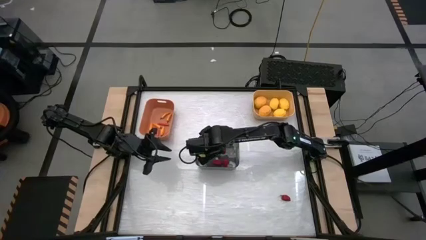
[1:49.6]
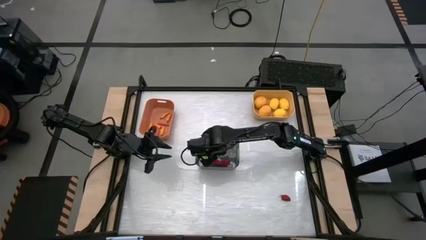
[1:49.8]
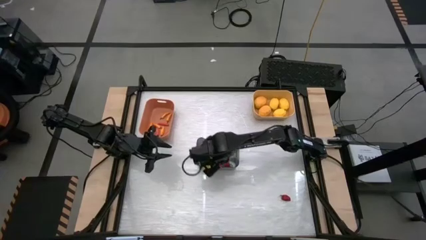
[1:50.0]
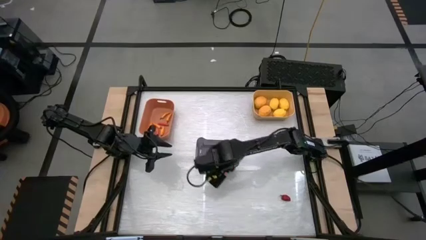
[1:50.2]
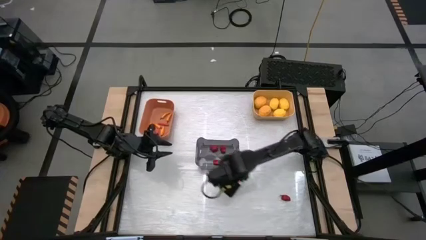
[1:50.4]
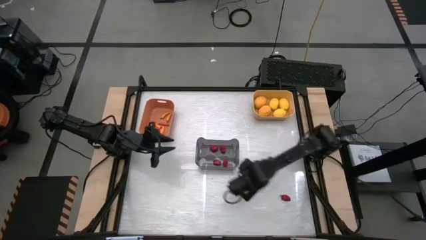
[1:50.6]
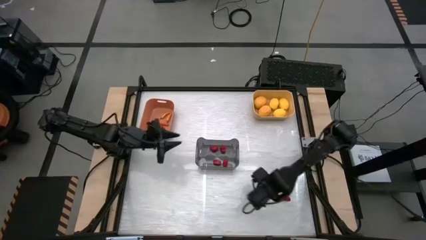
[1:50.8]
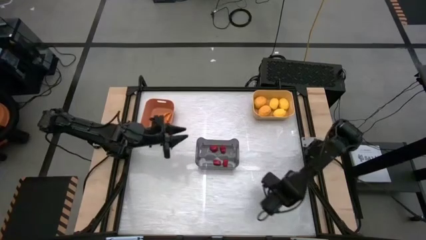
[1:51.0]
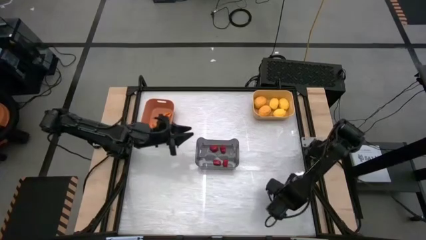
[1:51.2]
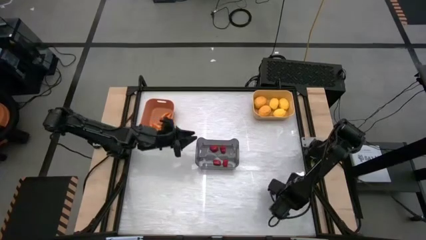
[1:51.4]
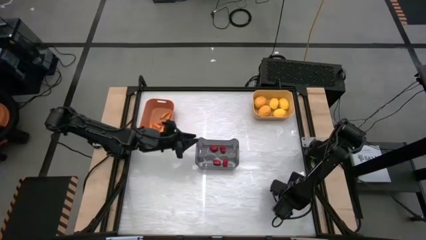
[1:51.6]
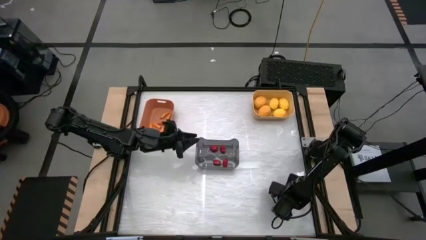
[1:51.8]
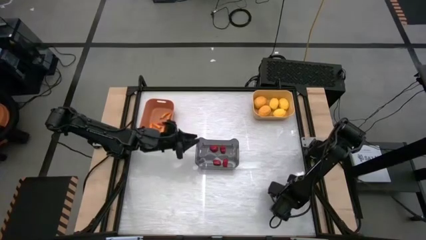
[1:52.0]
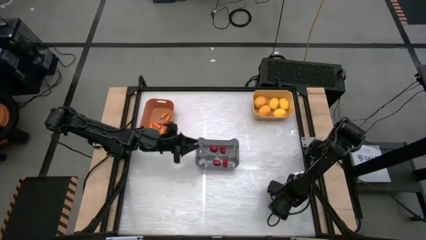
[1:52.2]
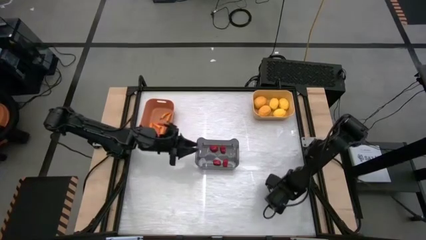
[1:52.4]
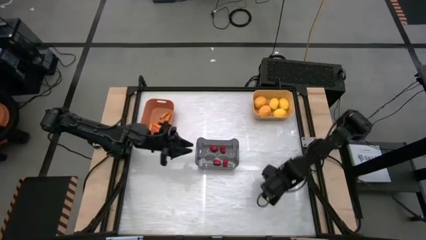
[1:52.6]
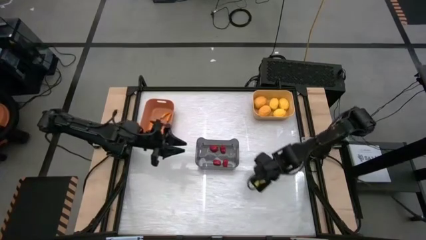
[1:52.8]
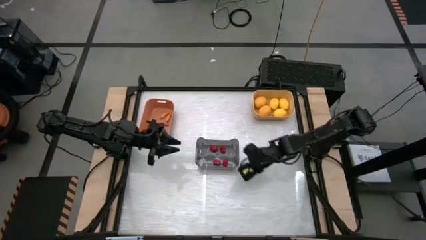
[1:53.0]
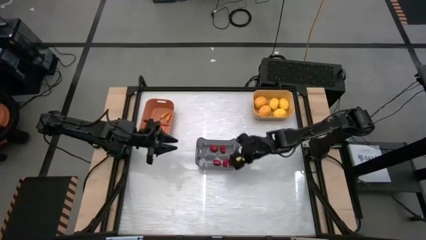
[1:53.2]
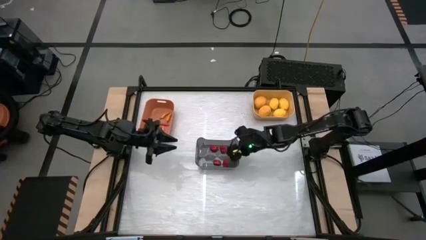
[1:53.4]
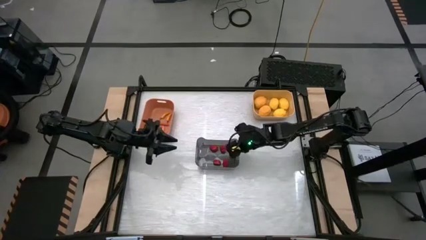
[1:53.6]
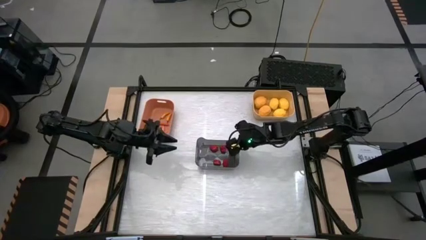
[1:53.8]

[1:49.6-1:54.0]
Task: Sort produce into baskets
Put the red bell pepper into the gray bin

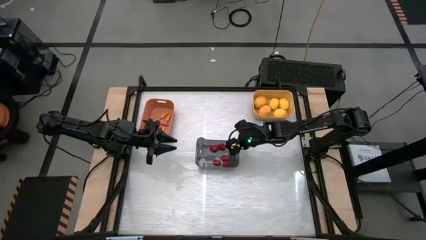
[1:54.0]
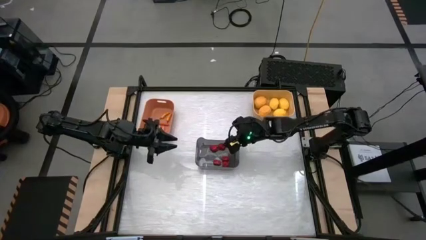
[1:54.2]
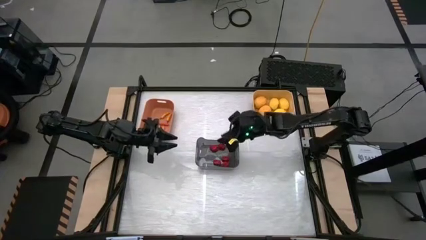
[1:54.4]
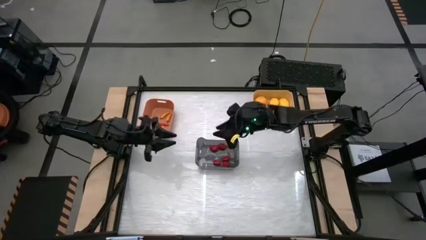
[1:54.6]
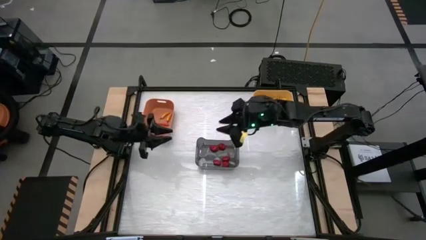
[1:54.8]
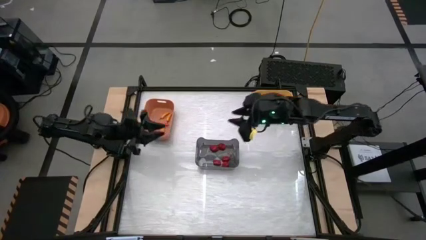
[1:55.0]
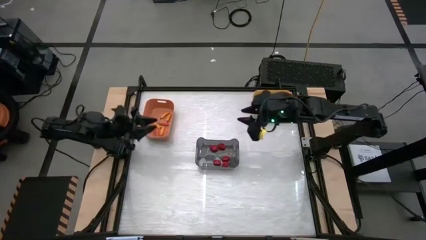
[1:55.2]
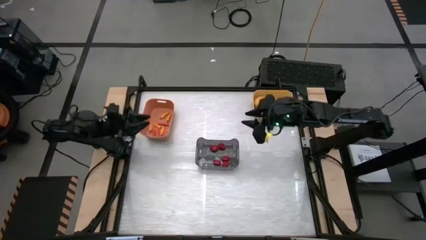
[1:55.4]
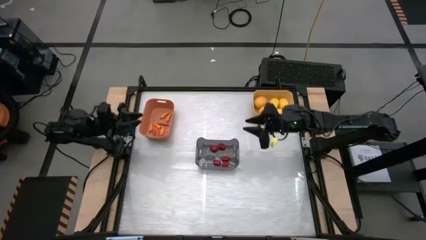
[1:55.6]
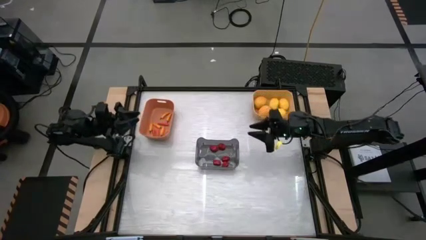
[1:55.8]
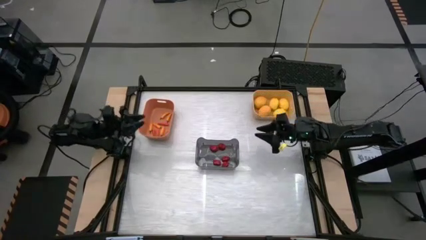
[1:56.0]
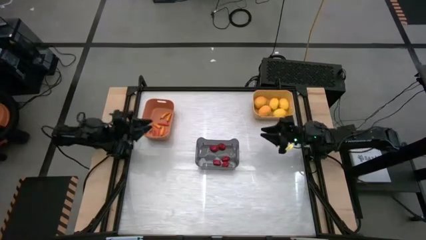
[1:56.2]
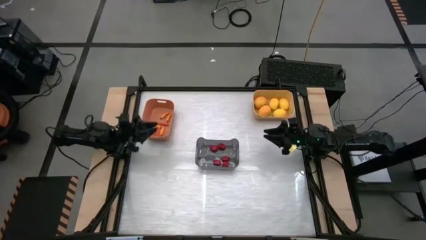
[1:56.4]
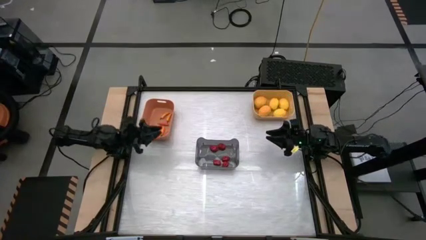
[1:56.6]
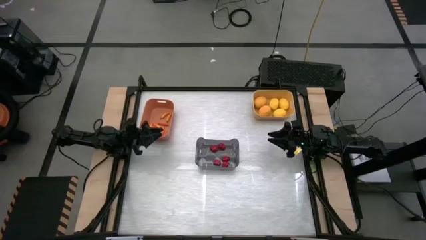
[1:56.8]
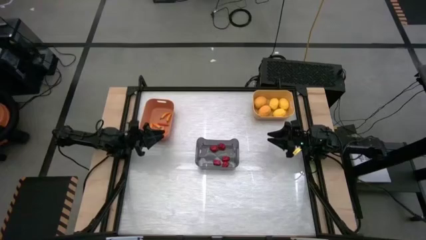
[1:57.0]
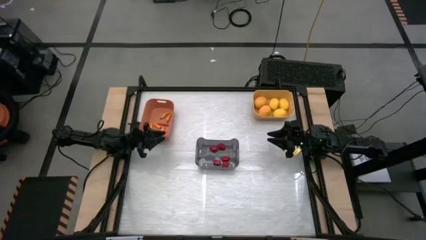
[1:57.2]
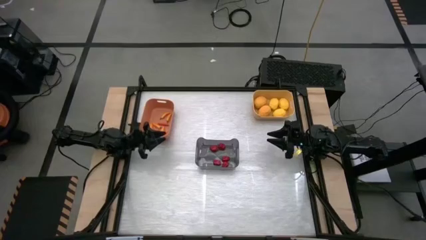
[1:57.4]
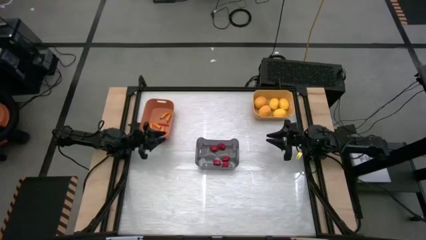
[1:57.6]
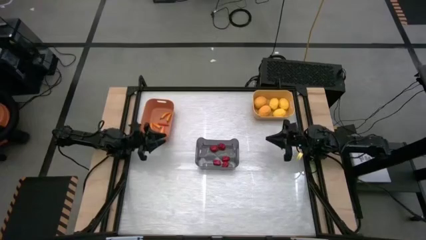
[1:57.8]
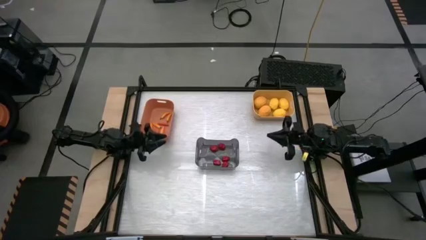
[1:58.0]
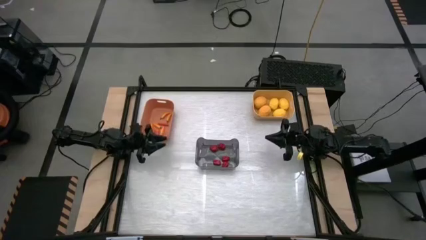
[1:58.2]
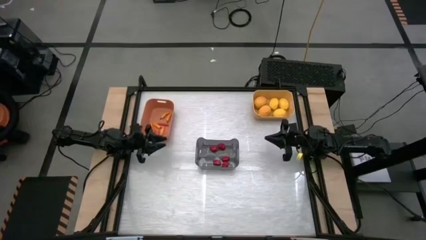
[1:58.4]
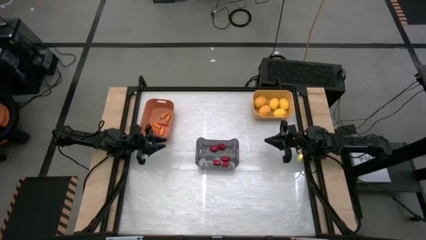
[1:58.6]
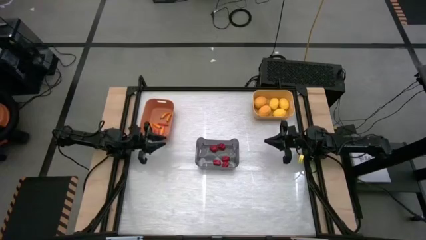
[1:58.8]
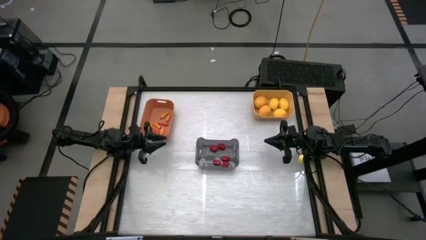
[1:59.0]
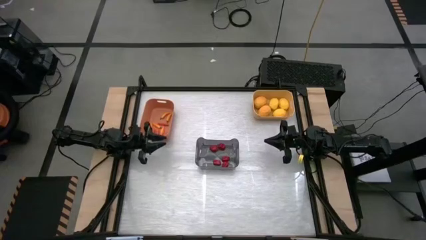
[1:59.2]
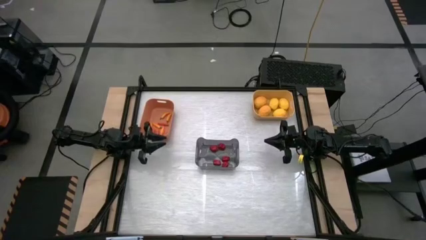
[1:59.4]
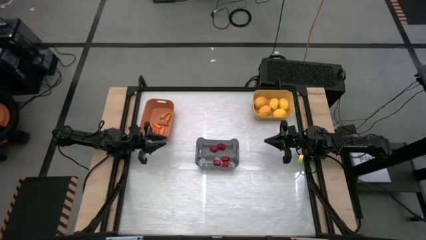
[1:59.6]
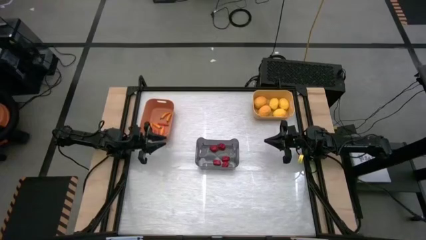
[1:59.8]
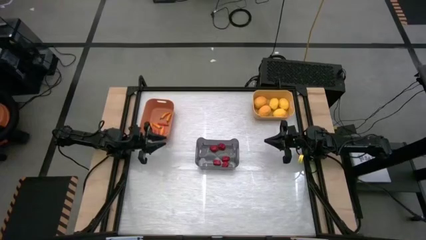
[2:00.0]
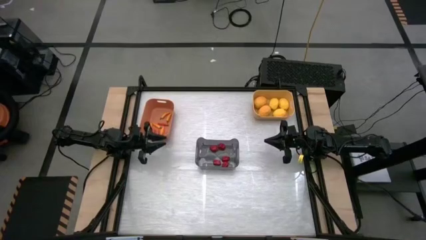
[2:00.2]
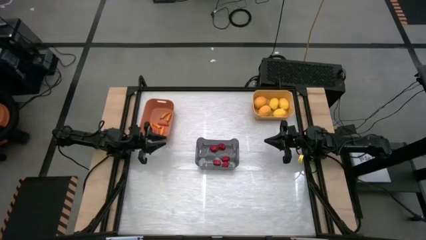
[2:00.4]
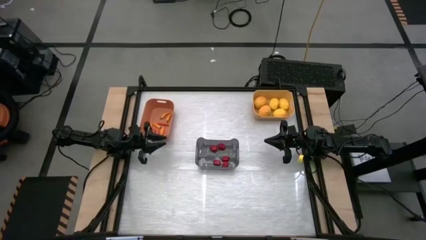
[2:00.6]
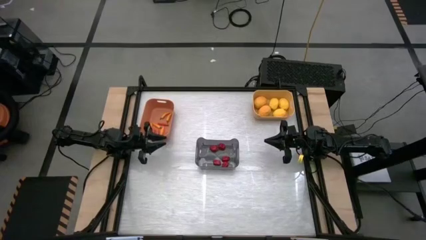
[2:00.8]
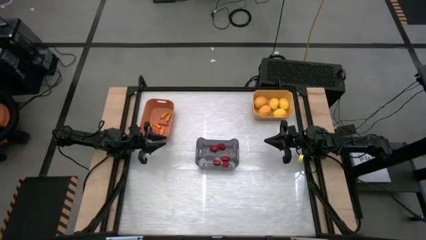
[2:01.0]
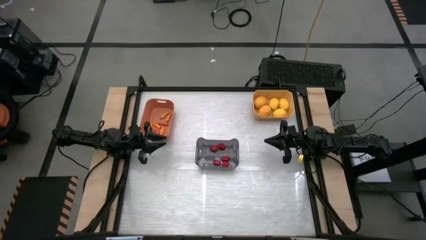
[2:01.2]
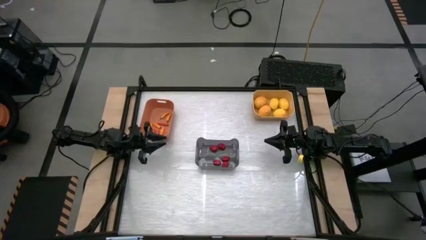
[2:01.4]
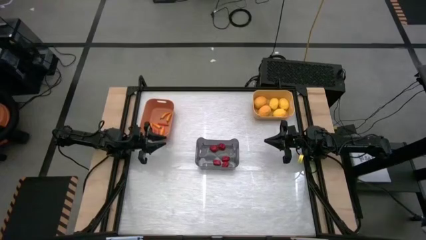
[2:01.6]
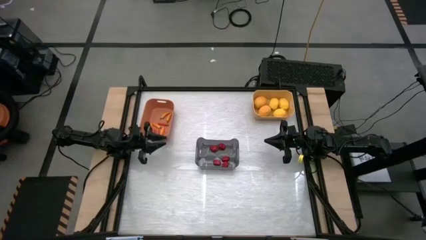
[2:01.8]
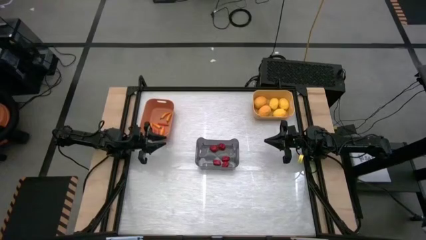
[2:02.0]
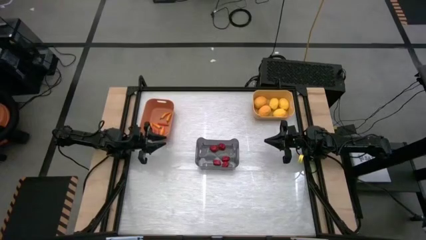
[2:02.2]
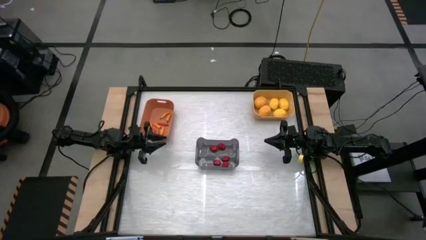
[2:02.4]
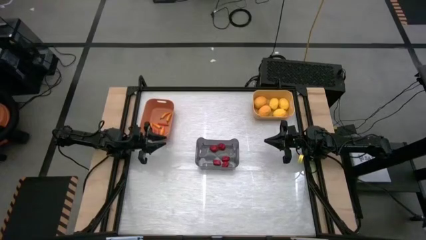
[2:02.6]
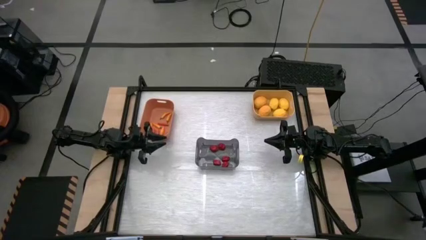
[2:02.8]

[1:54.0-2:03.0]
Return to Home Position

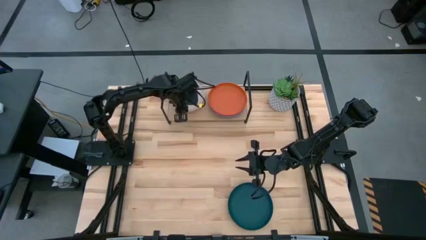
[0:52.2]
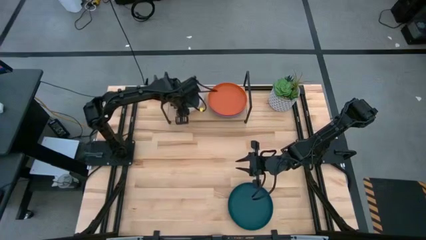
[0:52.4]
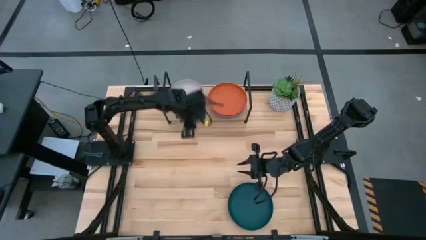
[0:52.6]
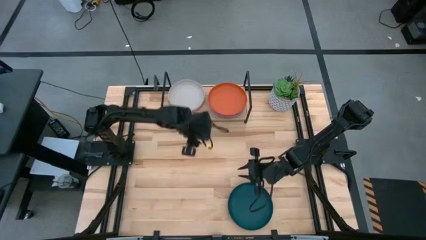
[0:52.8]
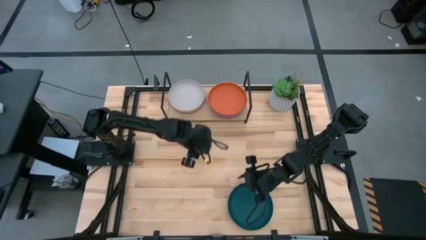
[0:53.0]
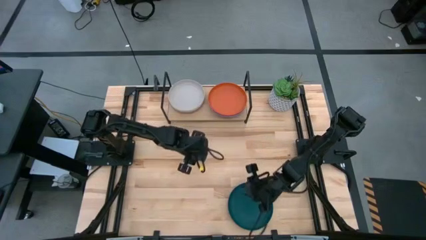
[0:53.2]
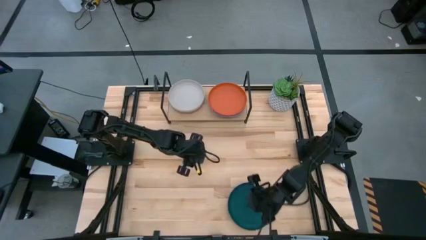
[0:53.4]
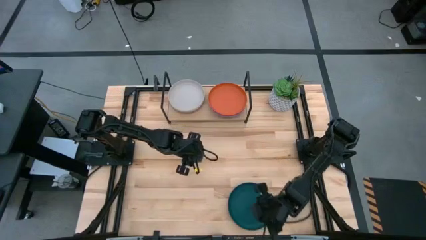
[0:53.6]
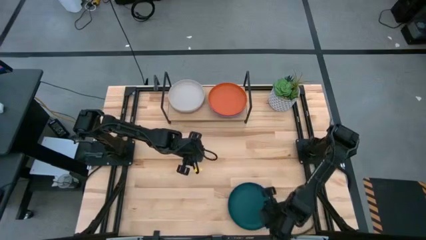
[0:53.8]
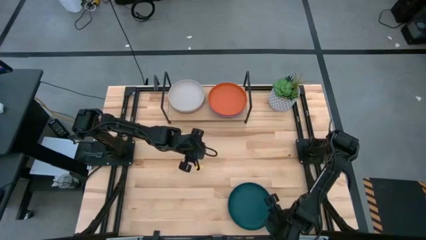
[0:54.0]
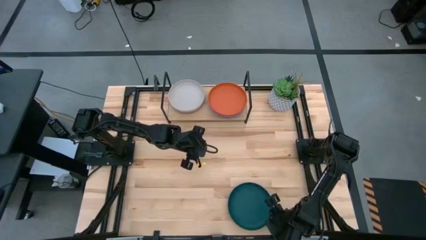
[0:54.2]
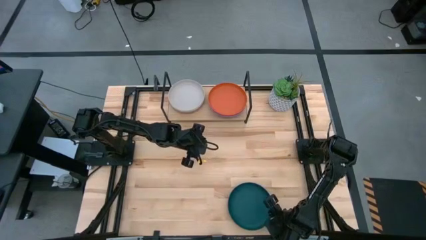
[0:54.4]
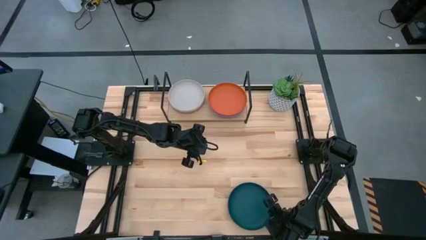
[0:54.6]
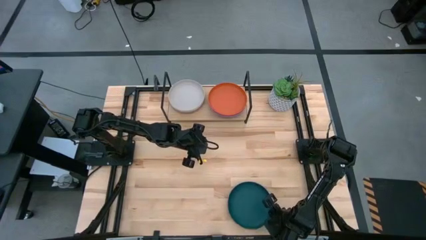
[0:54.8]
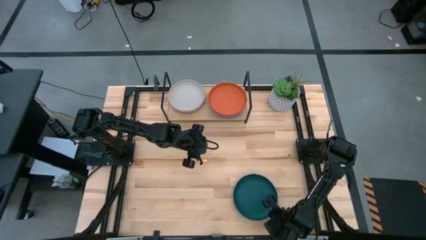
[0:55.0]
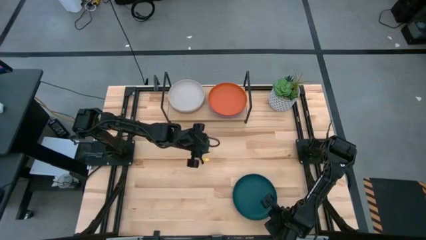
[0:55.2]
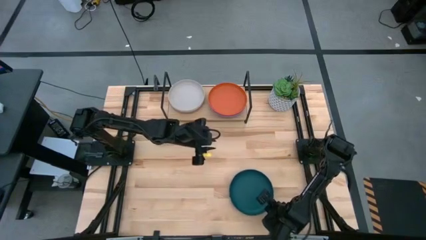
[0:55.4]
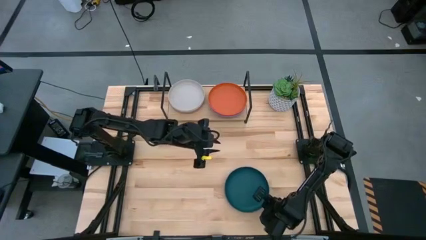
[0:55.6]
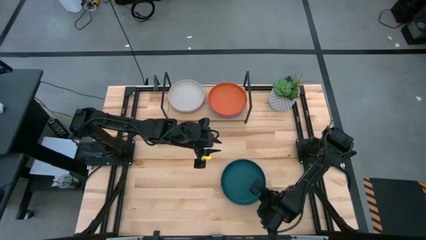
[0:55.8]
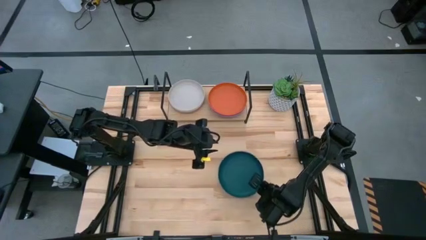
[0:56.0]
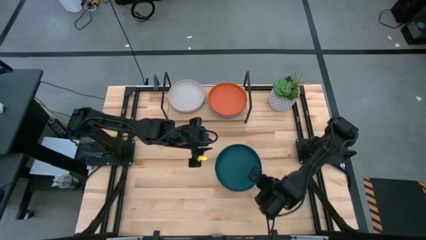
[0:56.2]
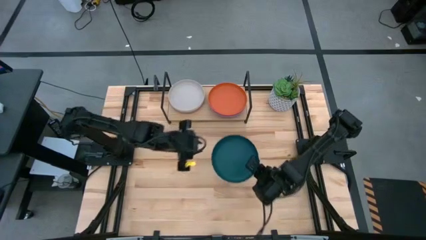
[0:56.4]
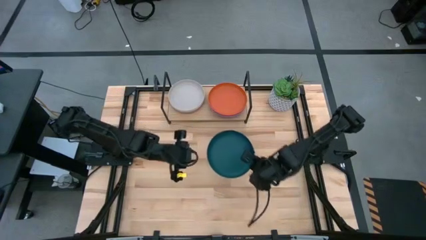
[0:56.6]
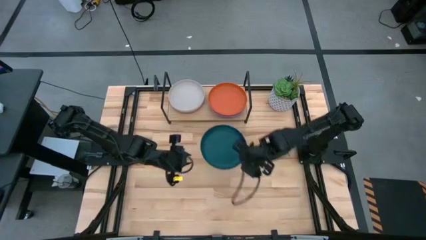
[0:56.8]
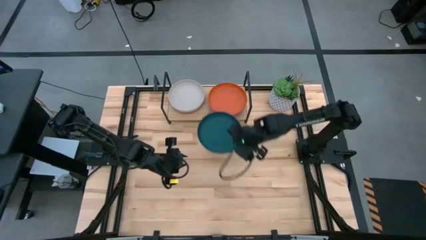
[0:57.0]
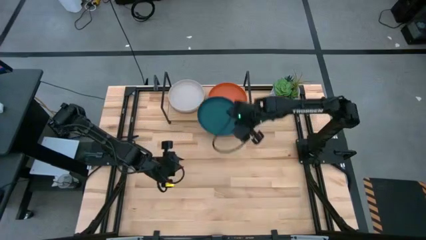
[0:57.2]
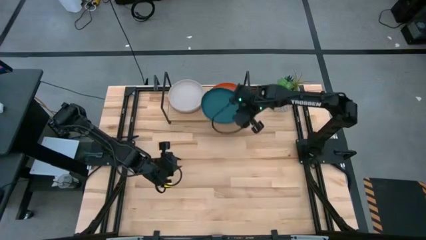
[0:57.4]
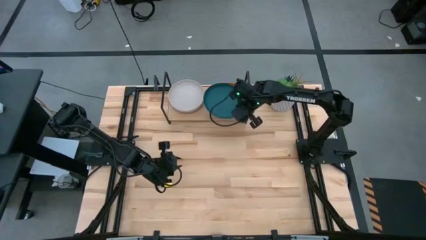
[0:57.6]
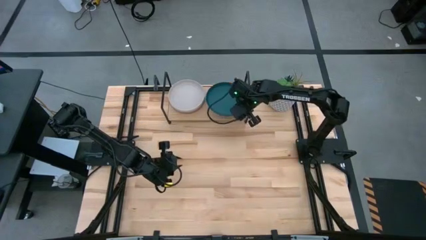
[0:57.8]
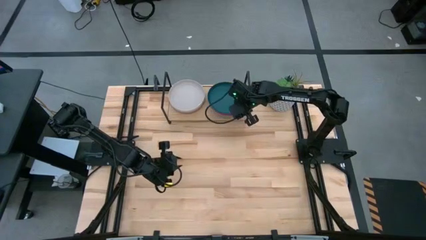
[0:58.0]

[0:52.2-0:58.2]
Task: Place and stack plates onto a shelf
Stack the dark blue plate on top of the orange plate on the shelf
